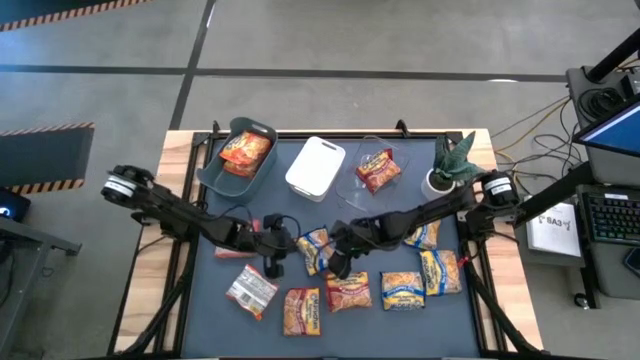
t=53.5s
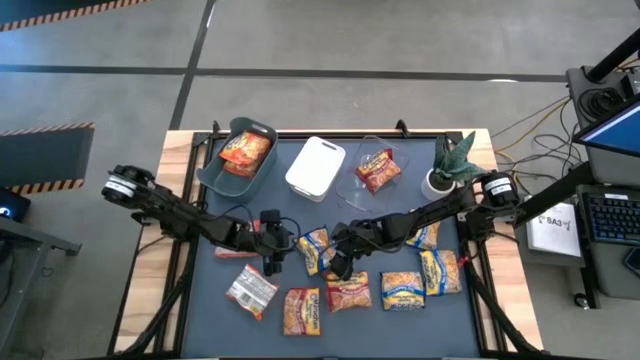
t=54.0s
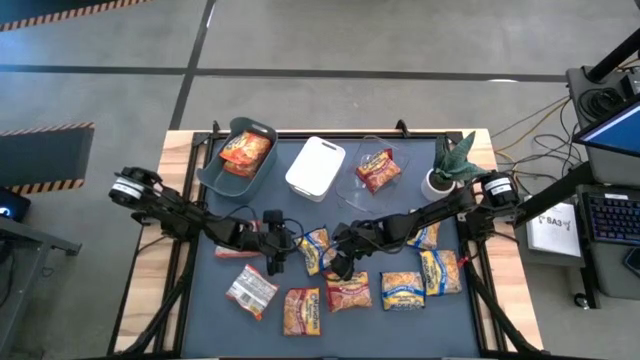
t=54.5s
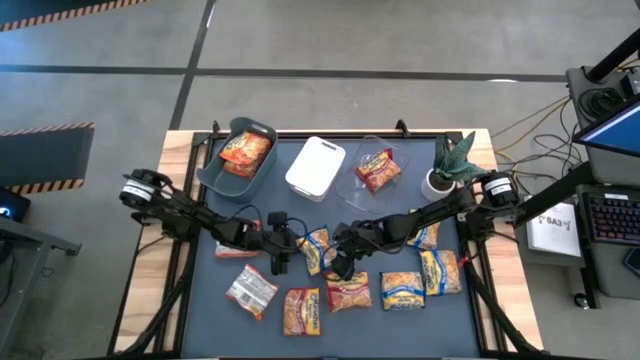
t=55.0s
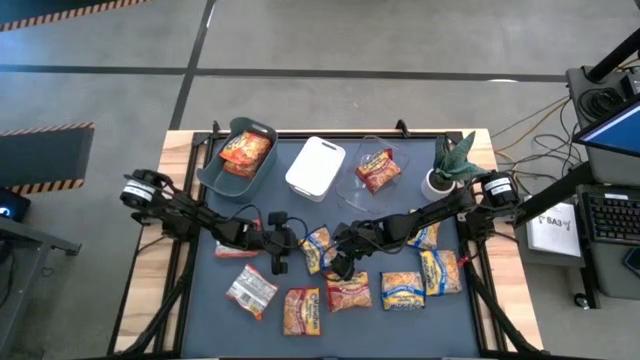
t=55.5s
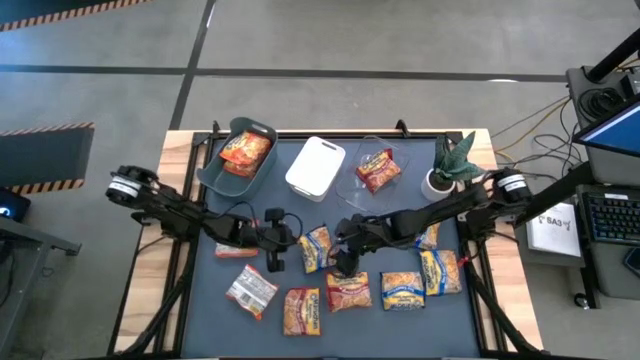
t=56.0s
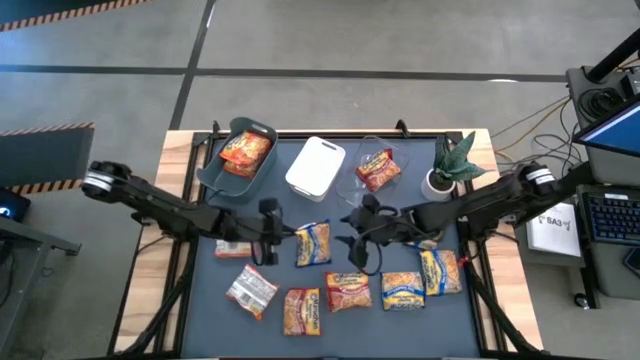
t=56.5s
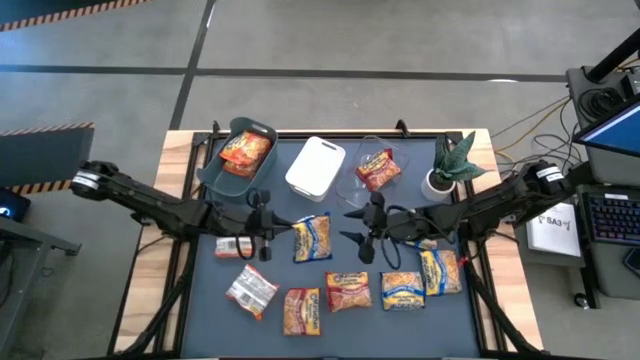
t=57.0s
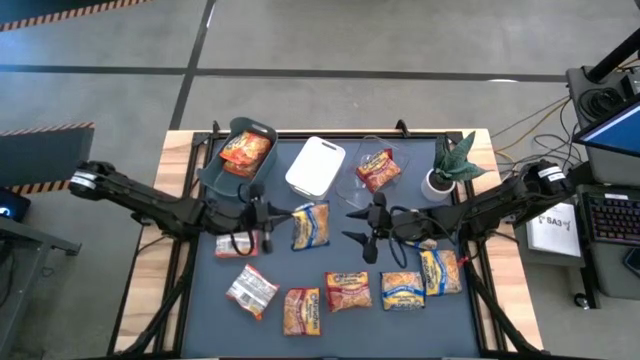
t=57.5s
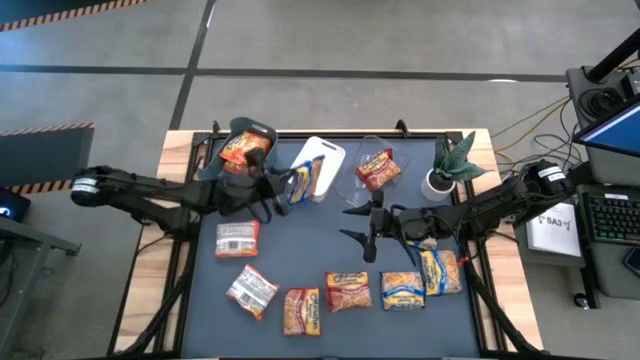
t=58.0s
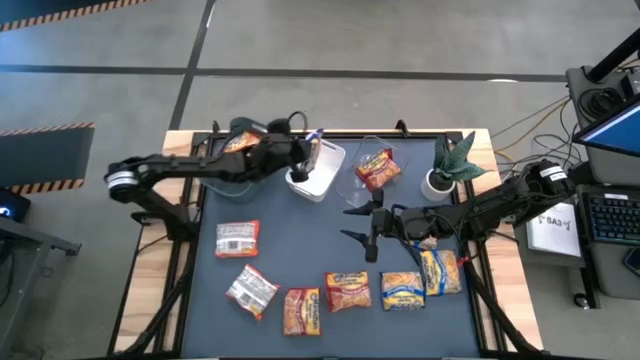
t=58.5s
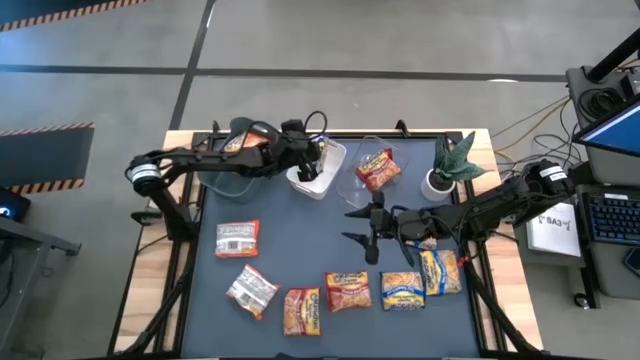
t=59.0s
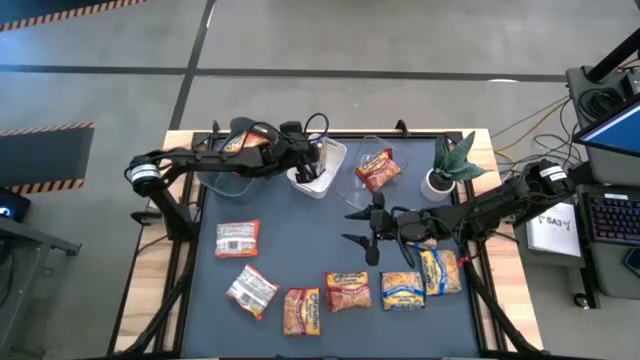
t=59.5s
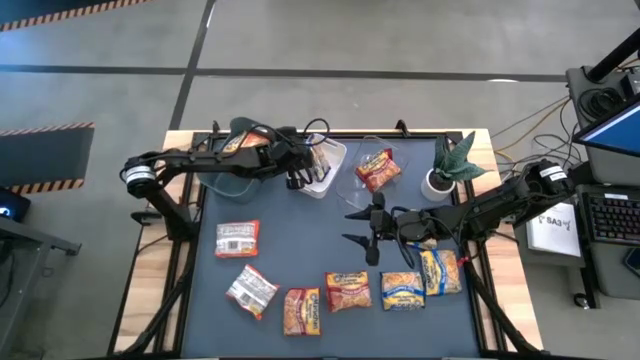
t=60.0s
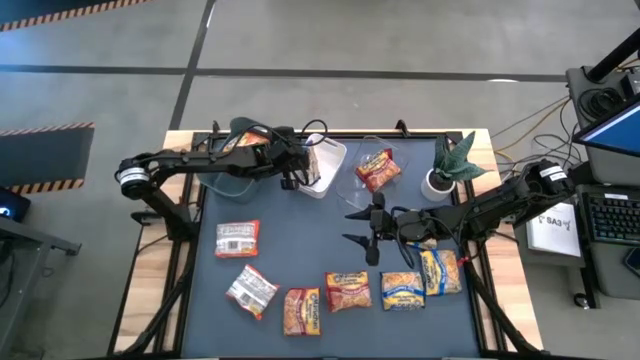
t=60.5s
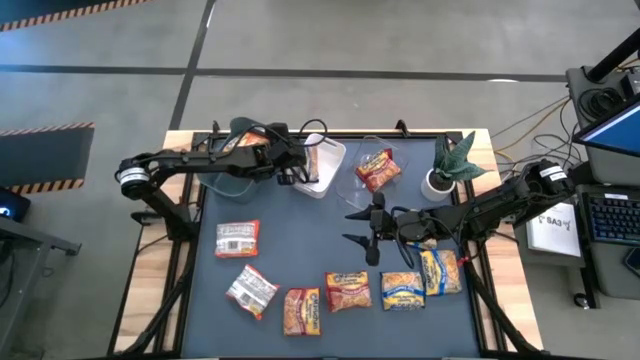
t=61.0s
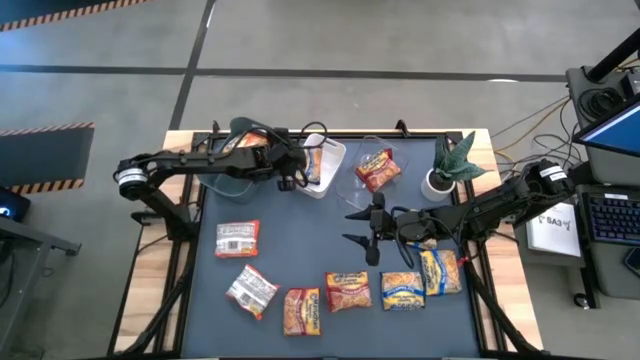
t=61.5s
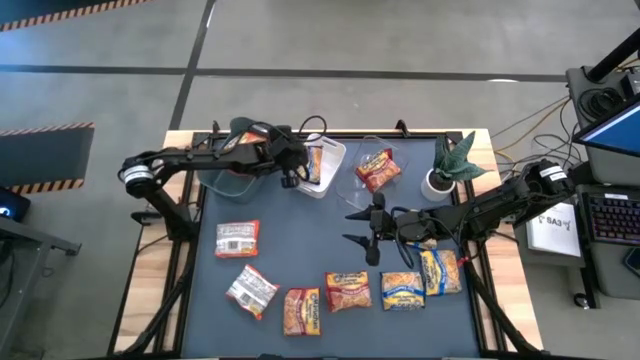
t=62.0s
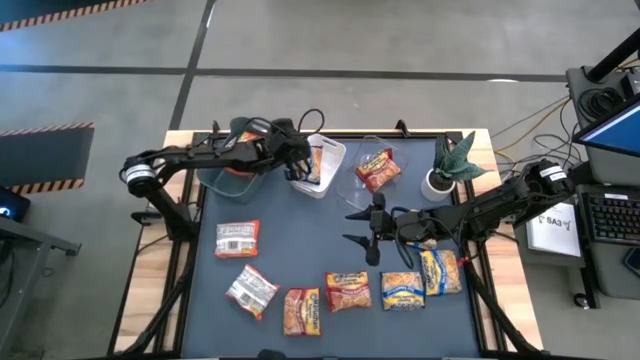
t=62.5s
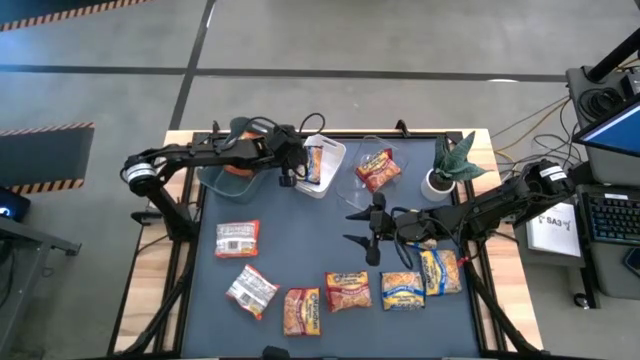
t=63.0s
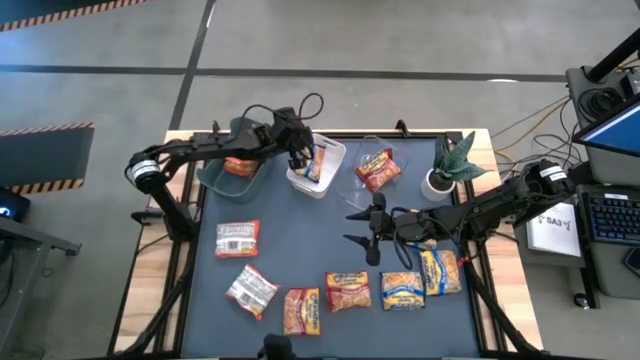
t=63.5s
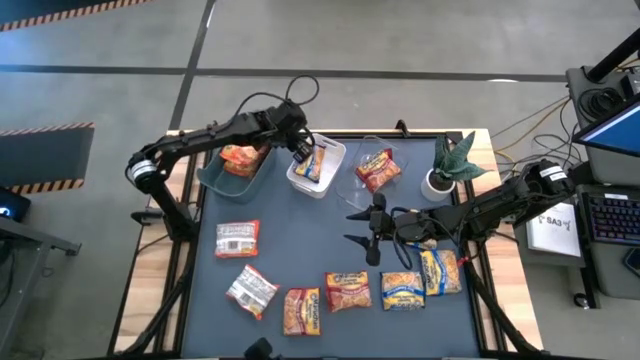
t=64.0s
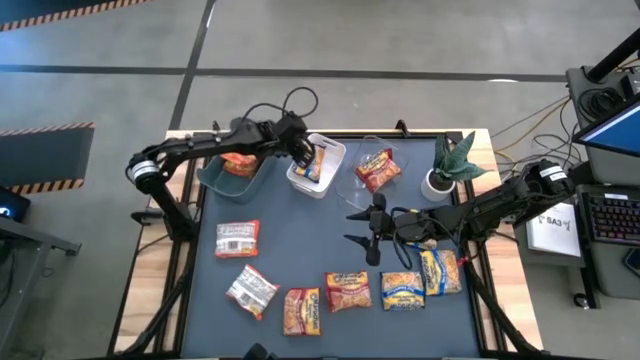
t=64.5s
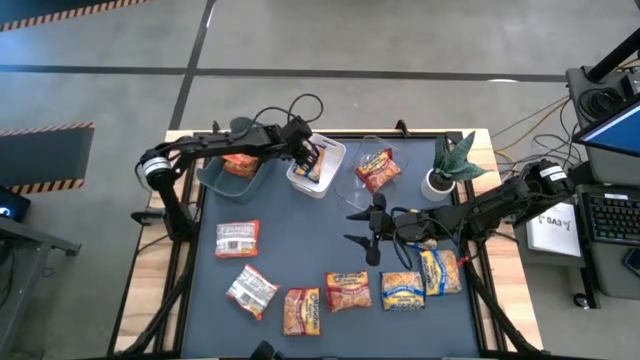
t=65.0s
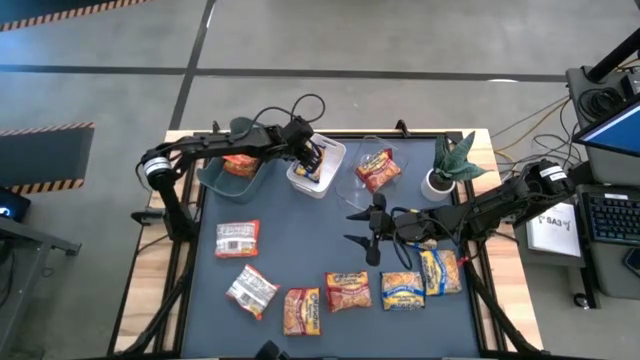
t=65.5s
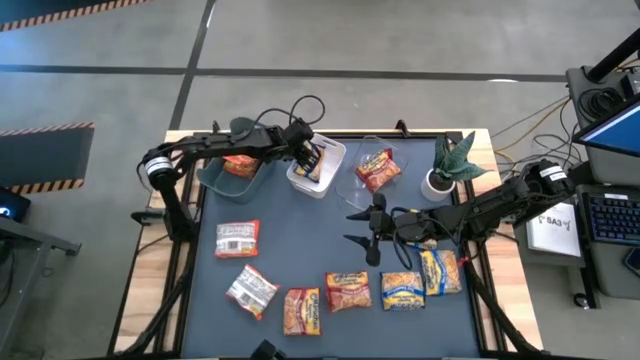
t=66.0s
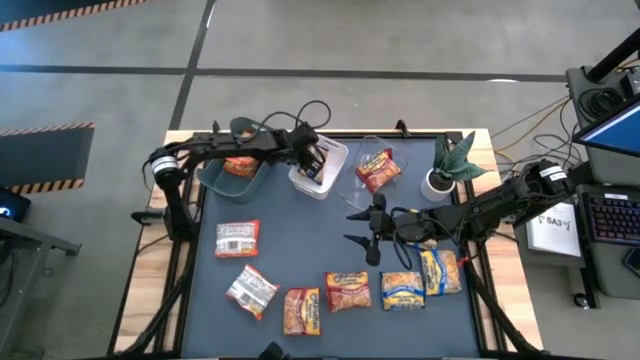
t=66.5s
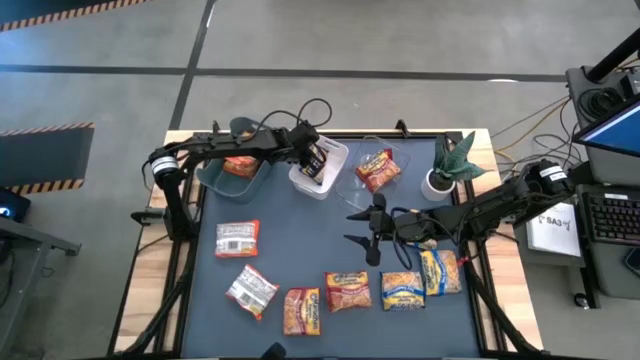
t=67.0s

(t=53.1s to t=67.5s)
Task: Sort Maruchan noodles
Put the blue noodle pack into the white bin

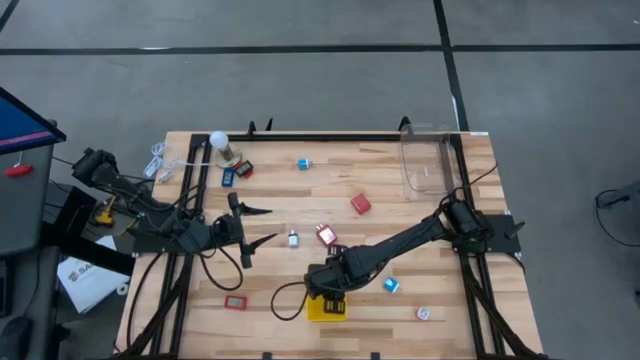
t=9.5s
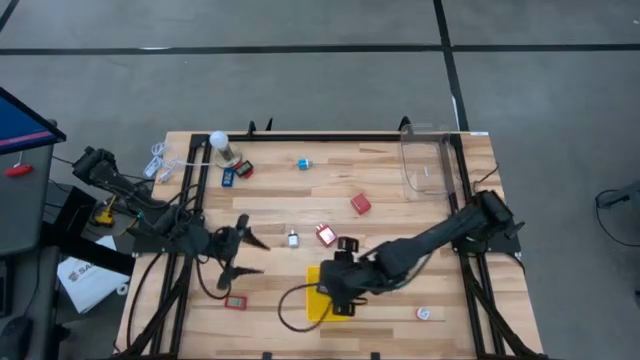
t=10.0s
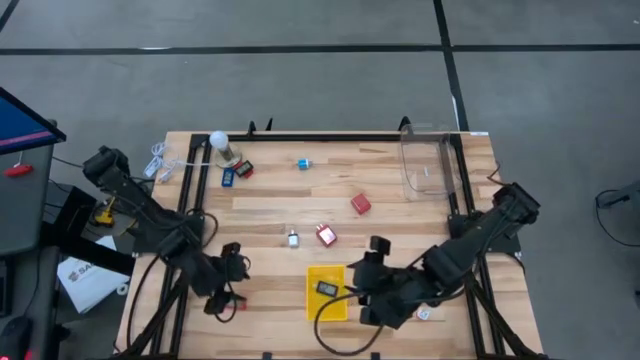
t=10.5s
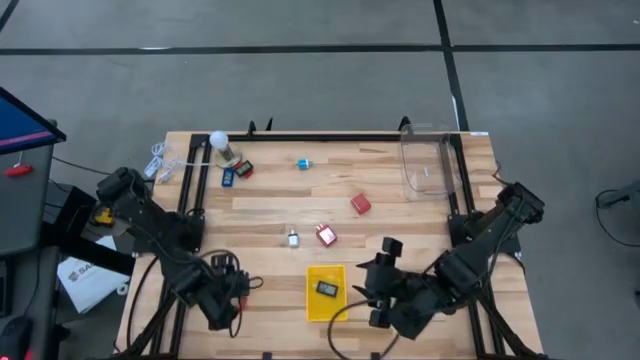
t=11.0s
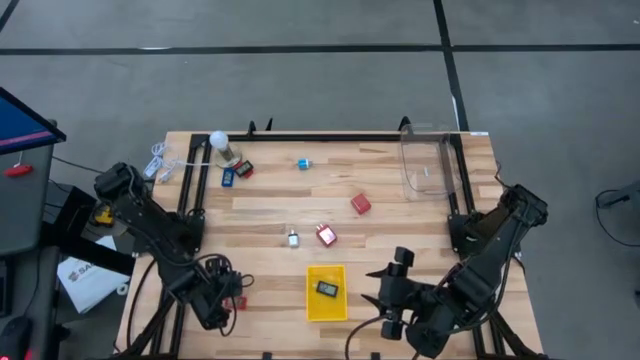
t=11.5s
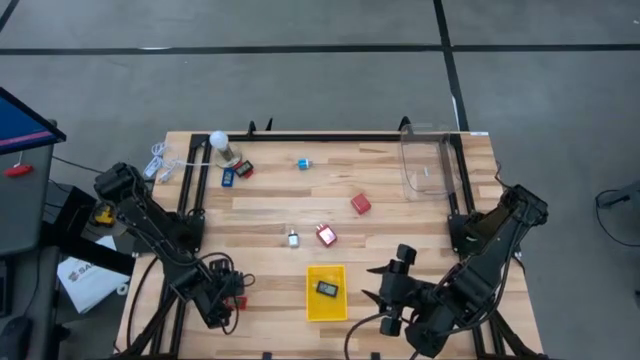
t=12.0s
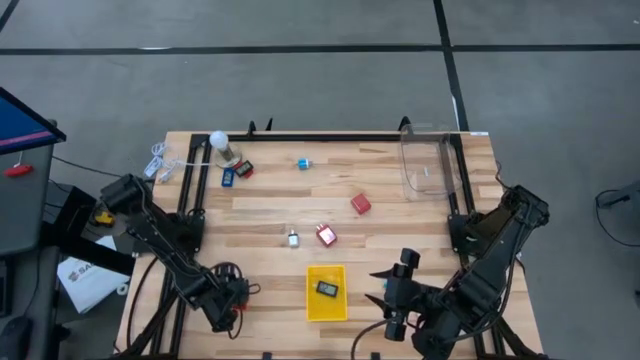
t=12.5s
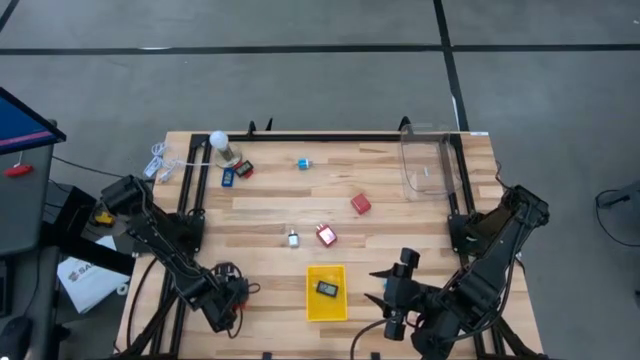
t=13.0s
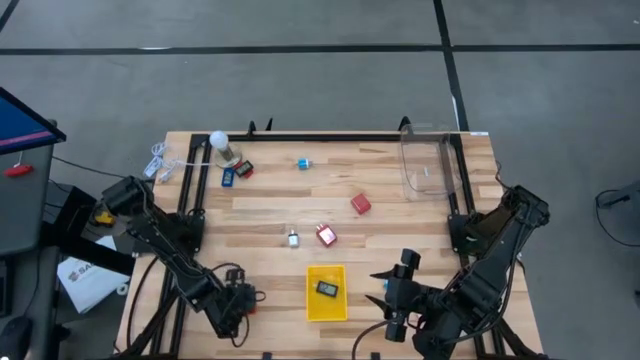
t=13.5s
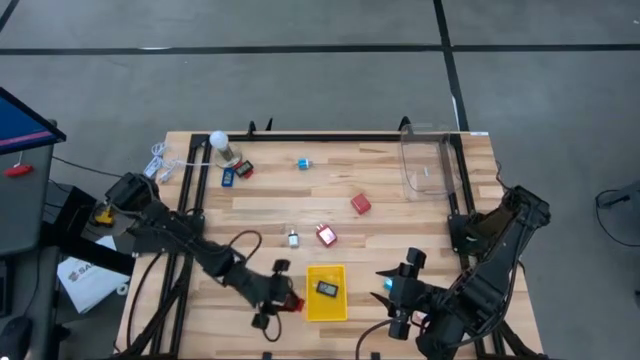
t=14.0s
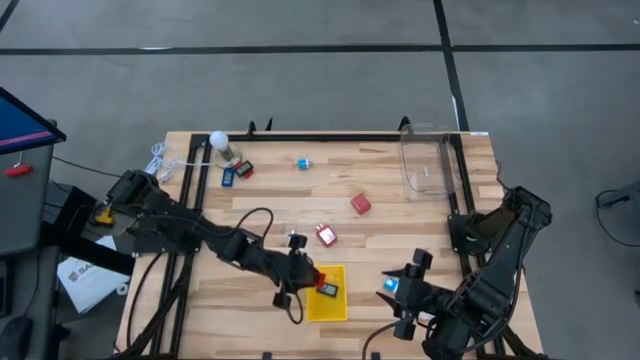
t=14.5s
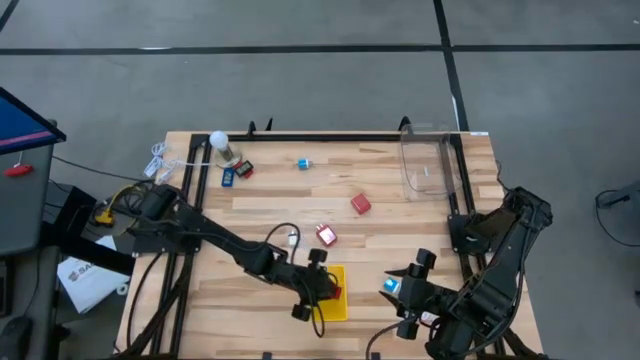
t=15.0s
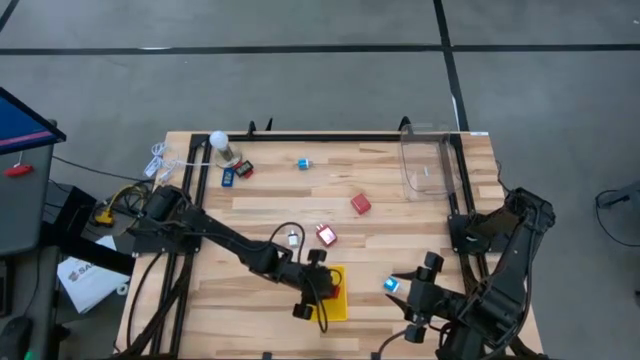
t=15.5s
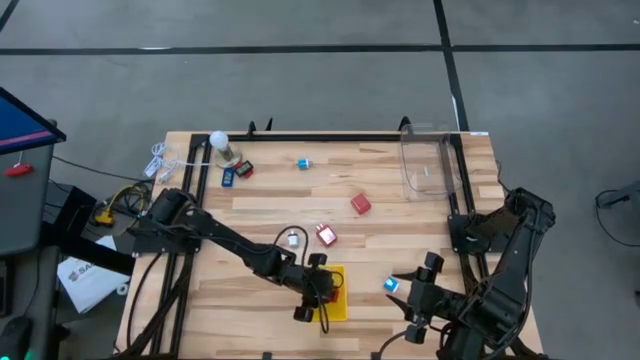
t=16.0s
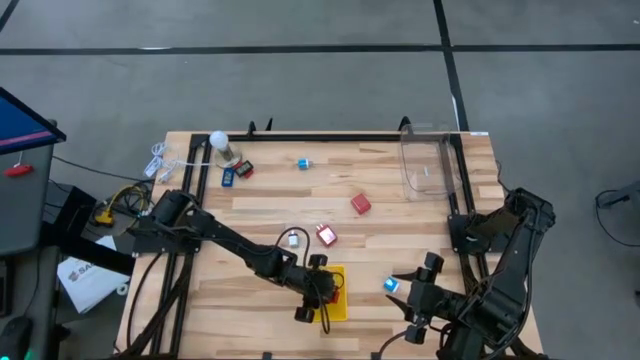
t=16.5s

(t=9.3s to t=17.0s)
Task: Pick & Place Office items
Put the bottom red digital timer into the yellow bin
